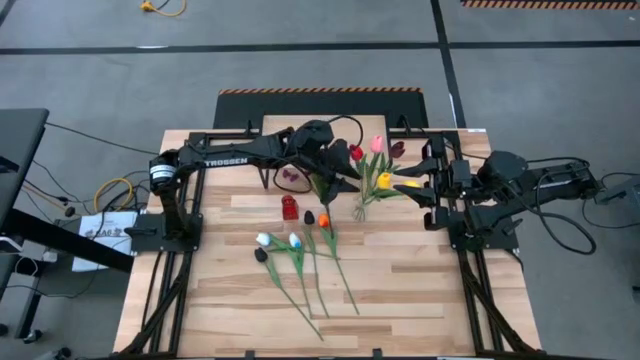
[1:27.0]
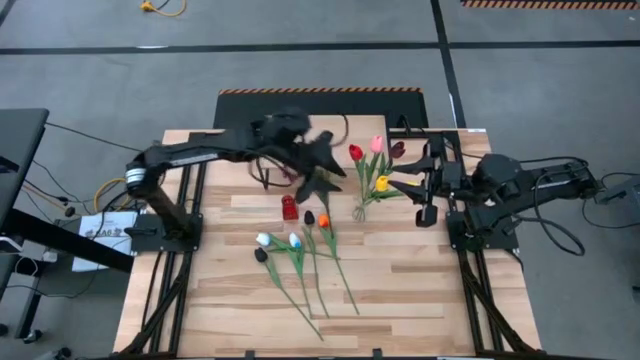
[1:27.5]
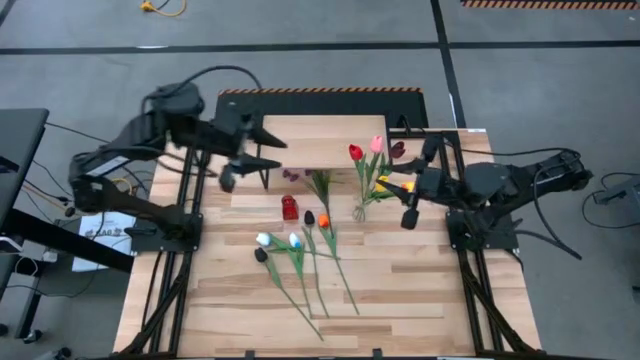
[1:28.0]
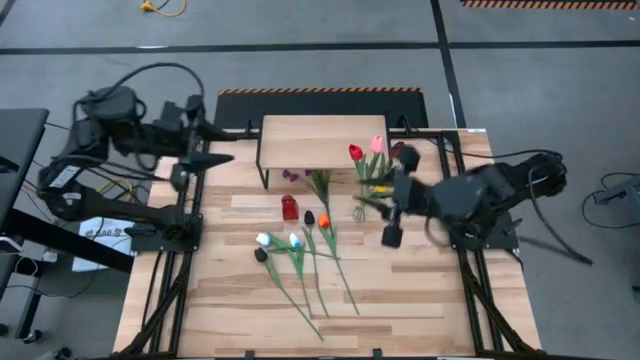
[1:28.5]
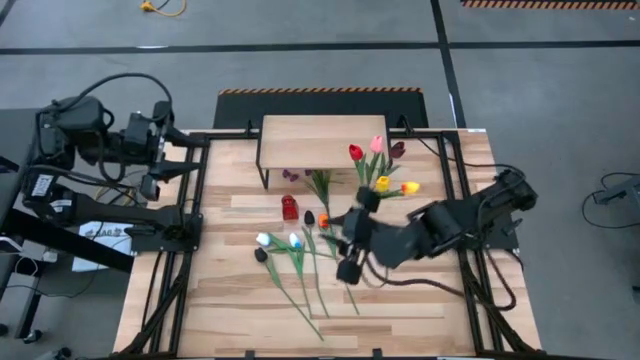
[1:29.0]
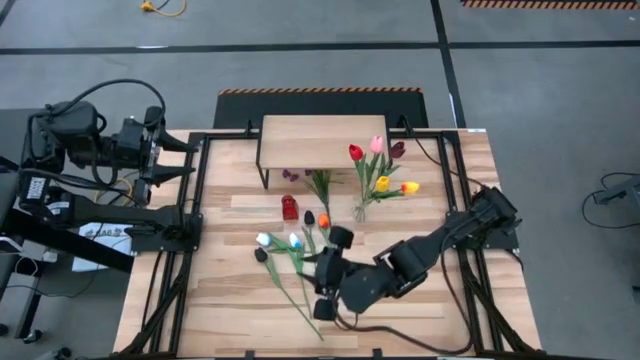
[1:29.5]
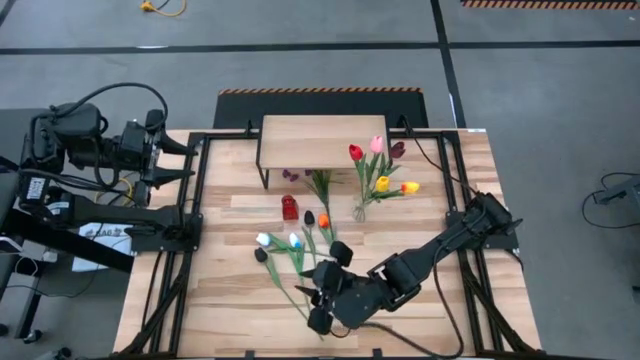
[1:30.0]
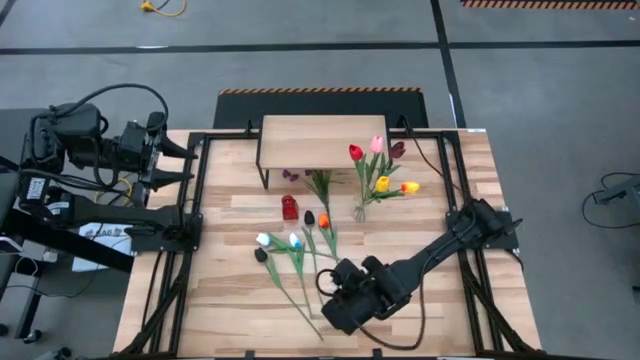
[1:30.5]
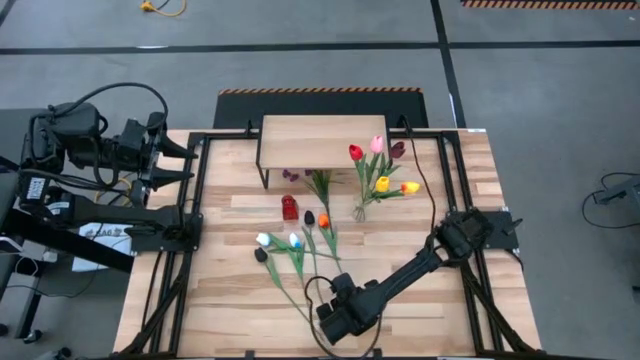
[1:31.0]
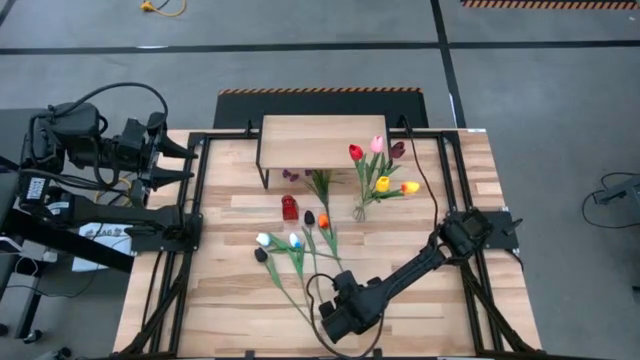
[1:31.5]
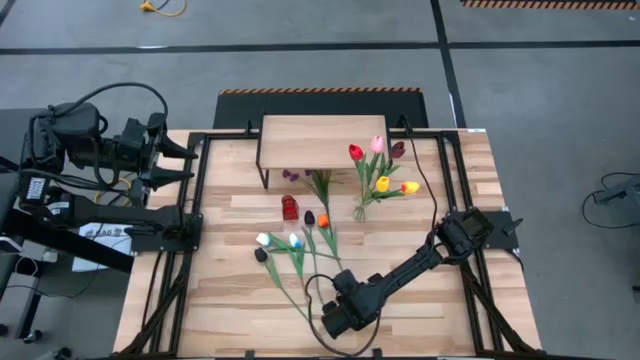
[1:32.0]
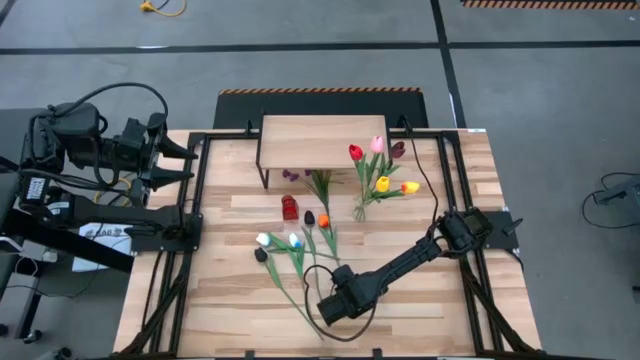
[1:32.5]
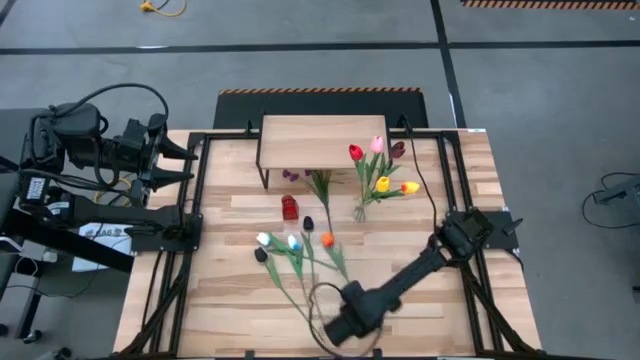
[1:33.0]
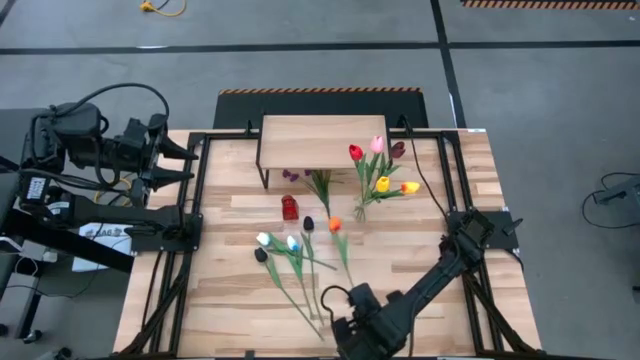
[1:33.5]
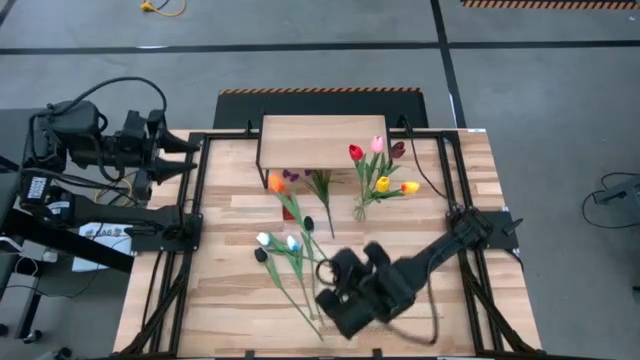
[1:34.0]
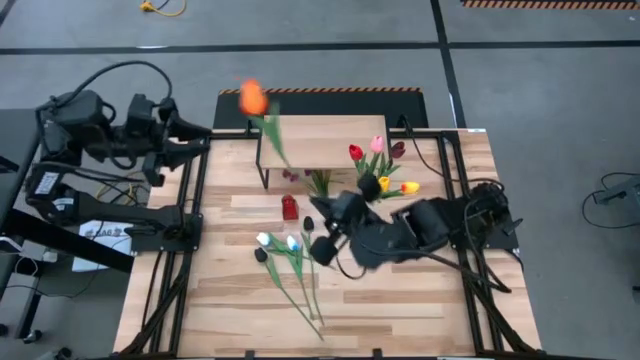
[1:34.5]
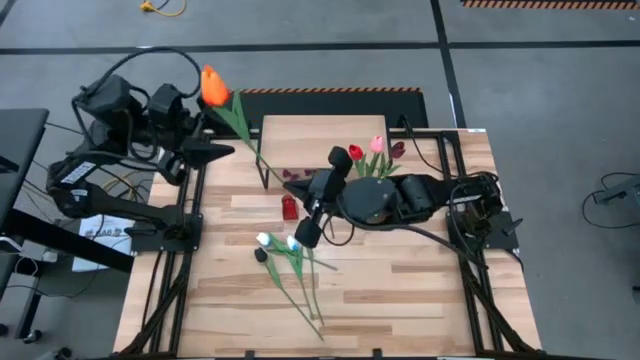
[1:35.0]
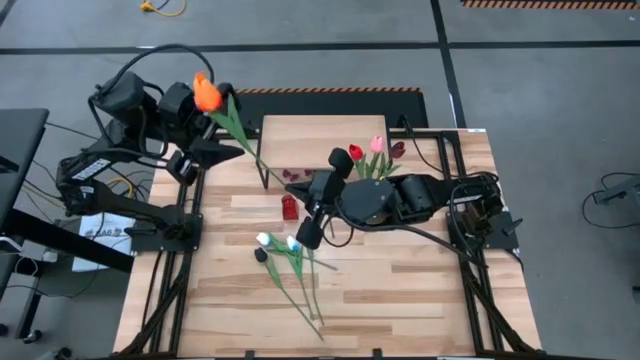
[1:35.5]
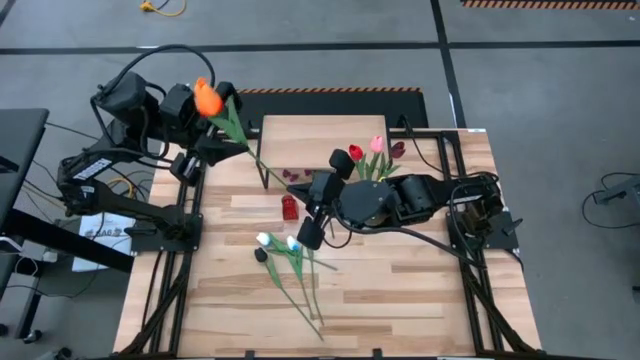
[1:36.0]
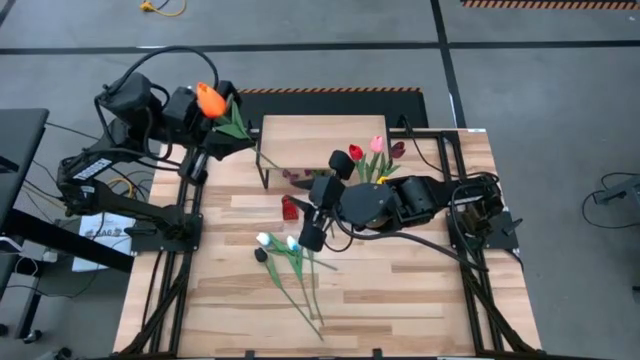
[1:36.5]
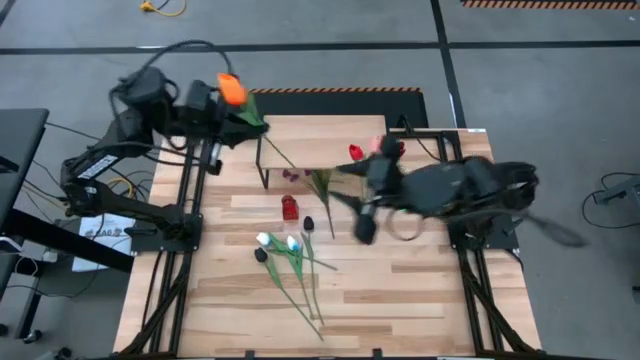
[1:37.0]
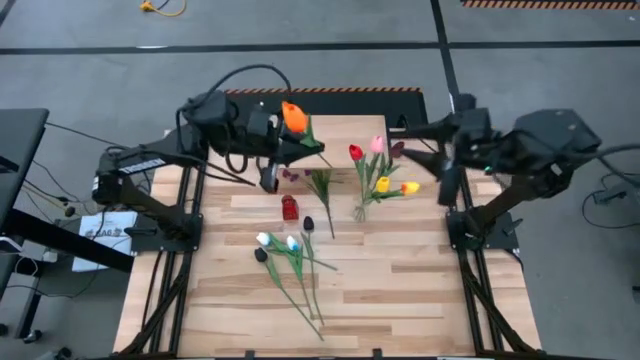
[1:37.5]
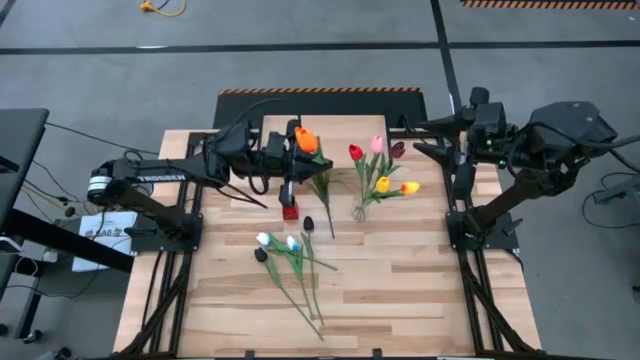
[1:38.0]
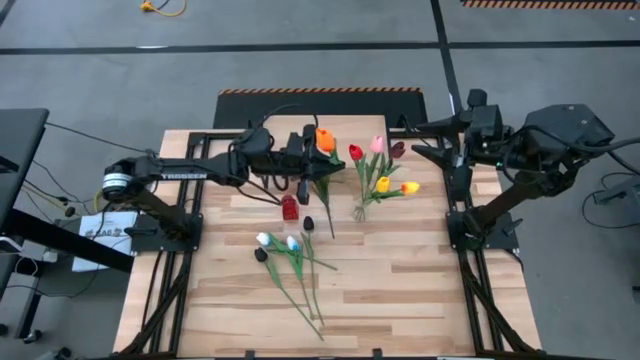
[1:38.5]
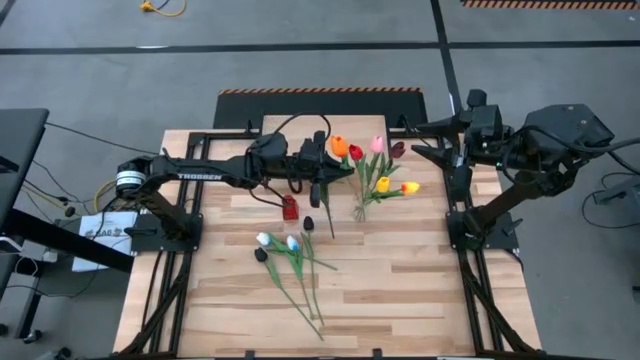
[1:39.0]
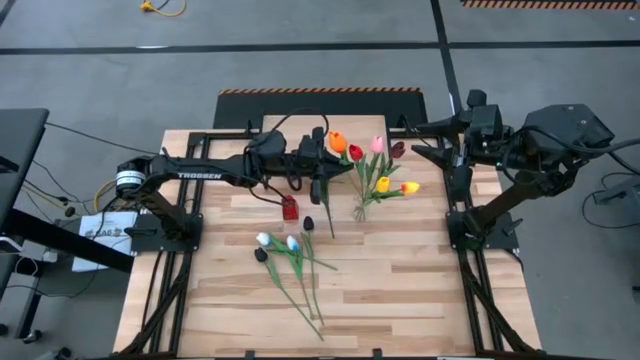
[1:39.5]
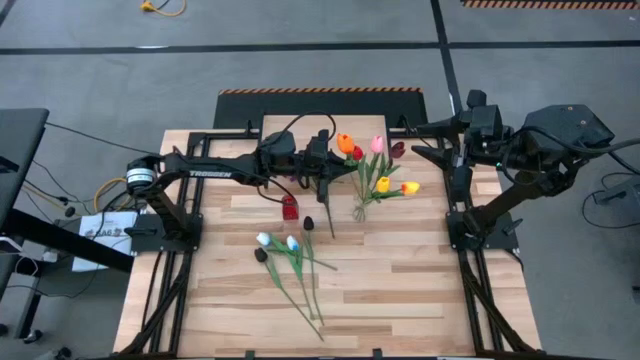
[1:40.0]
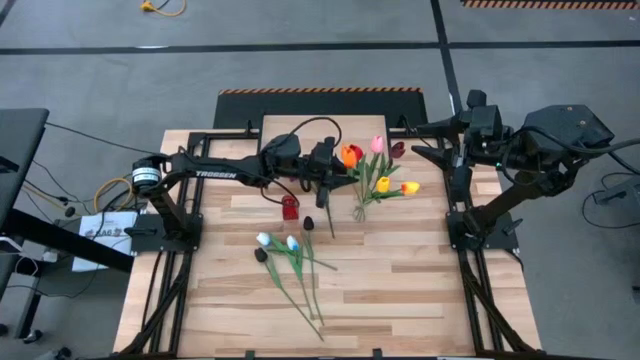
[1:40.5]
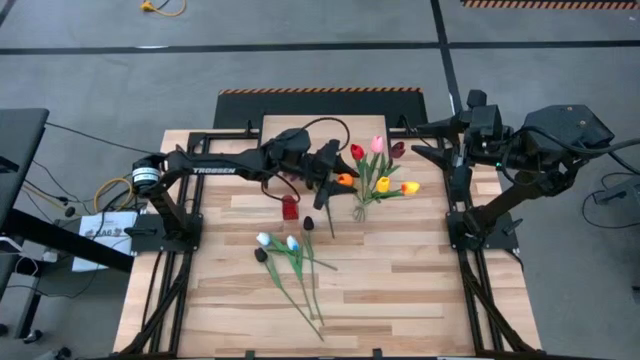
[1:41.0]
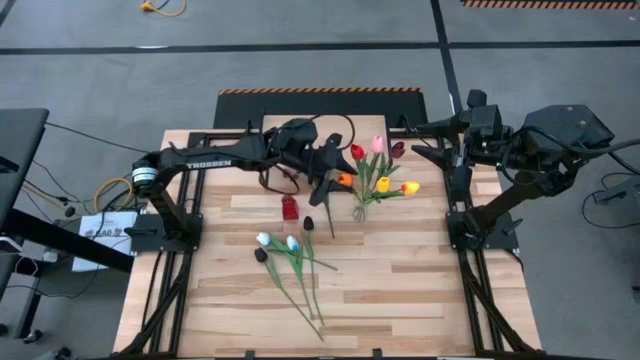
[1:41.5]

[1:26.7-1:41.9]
Task: Pick and place flowers into a vace then onto a shelf
Put the orange tulip into the transparent vase

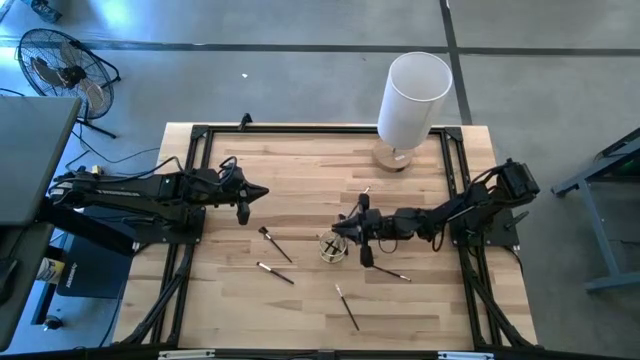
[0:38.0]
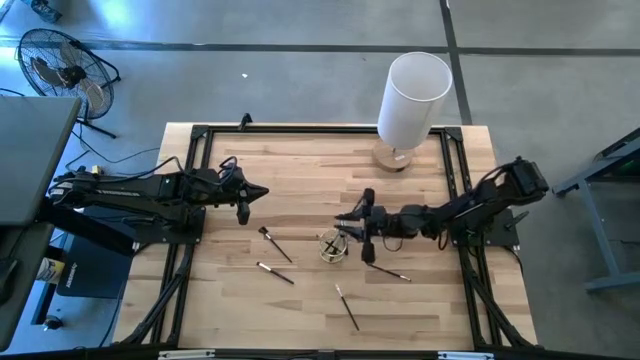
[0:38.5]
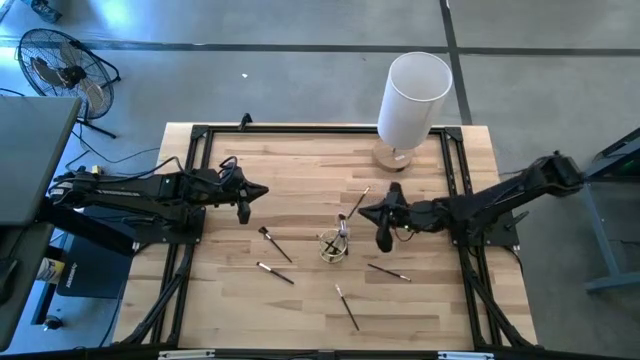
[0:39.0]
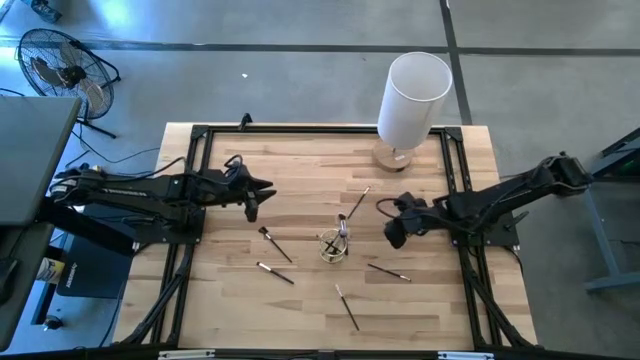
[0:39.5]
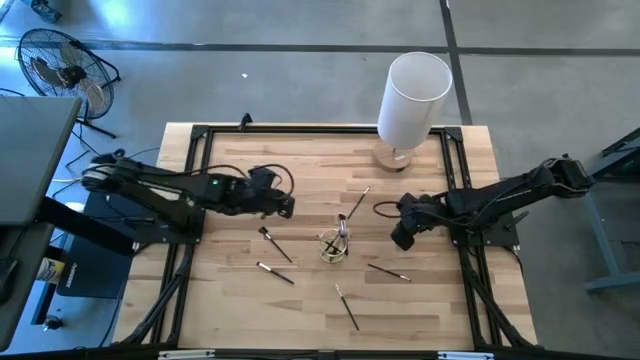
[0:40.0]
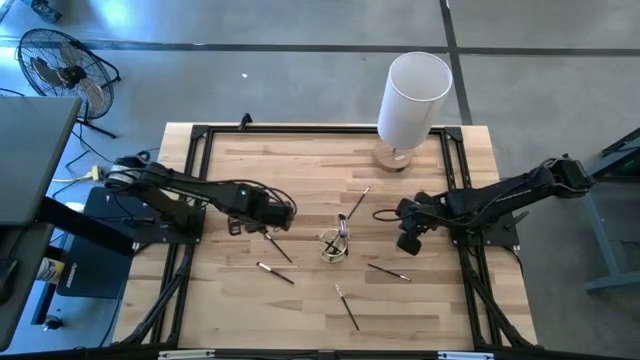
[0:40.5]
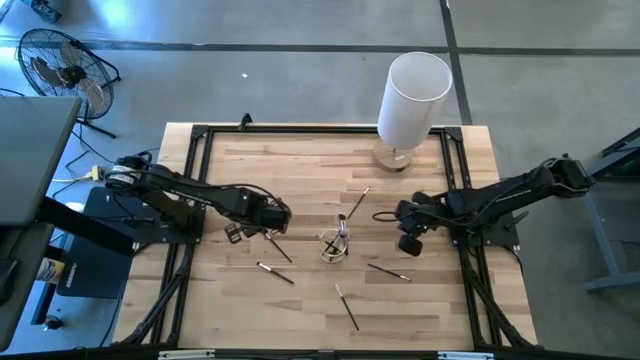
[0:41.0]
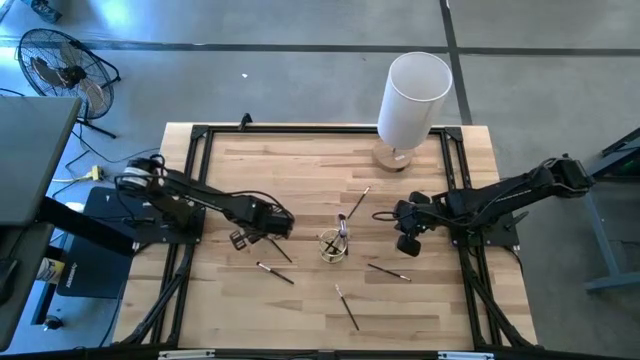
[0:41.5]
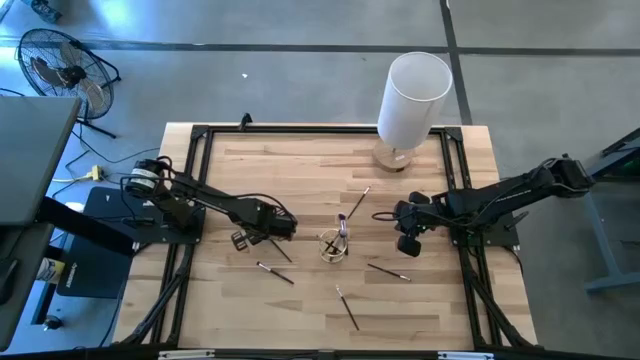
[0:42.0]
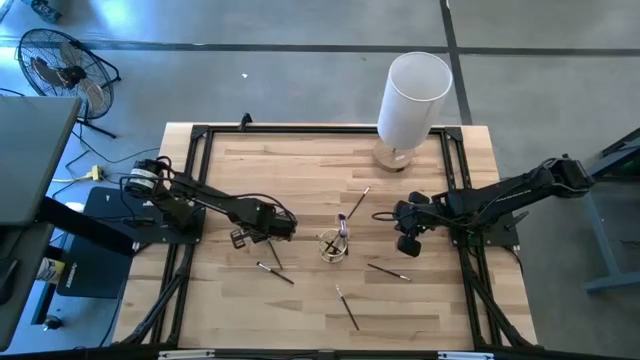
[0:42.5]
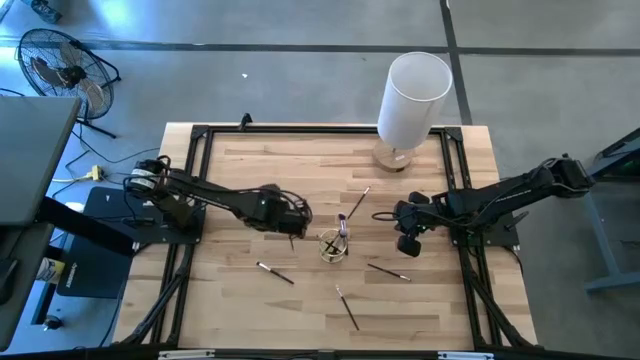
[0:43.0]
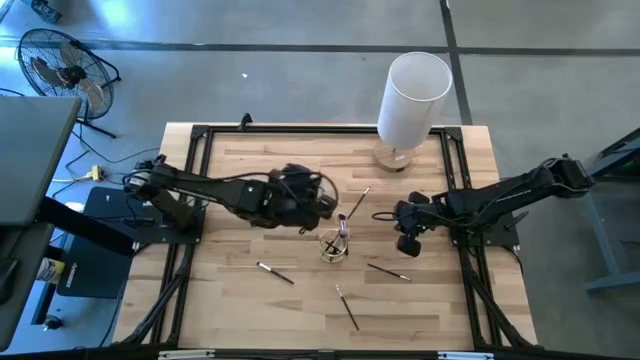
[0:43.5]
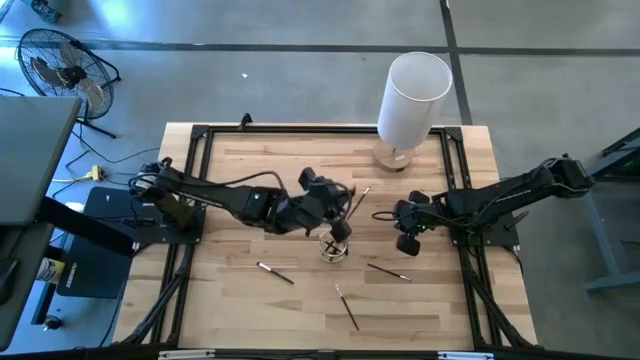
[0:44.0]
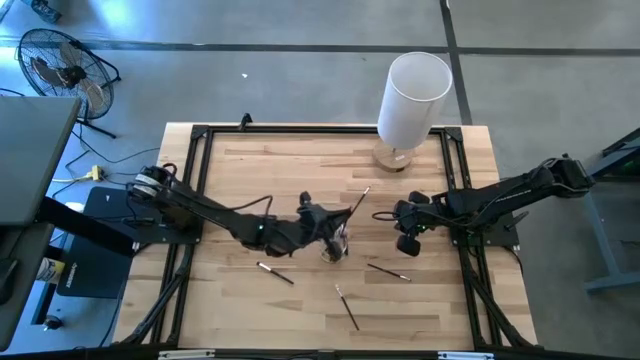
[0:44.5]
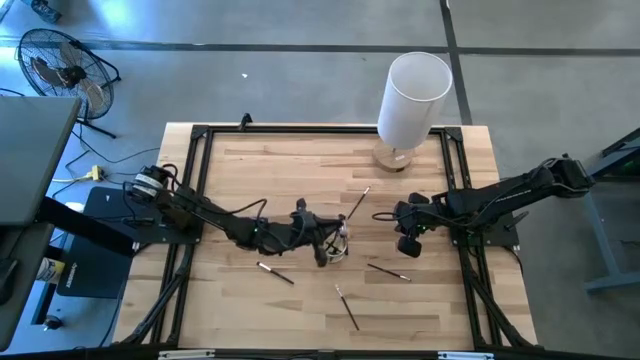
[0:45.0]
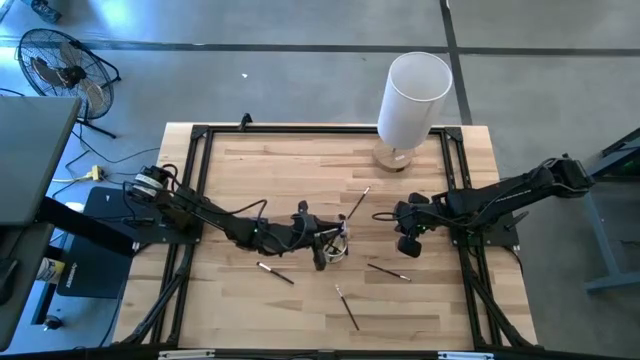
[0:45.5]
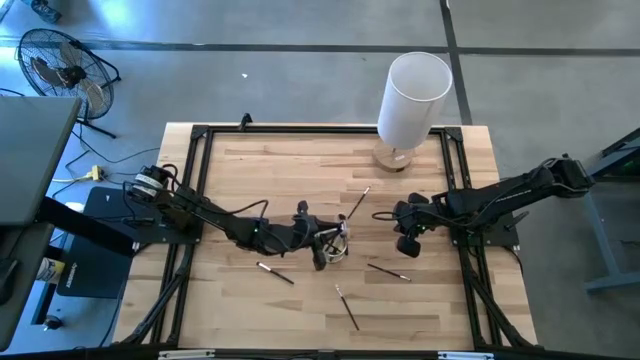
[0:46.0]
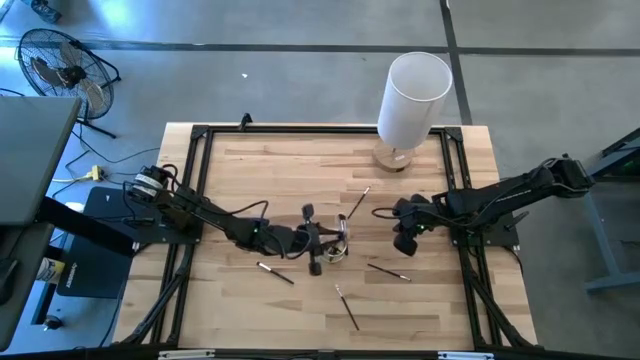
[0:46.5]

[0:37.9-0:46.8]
Task: Put items in baskets/containers
Put the eye groomer brush into the mesh organizer
